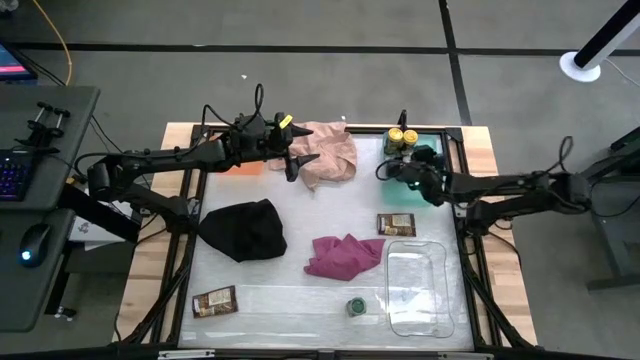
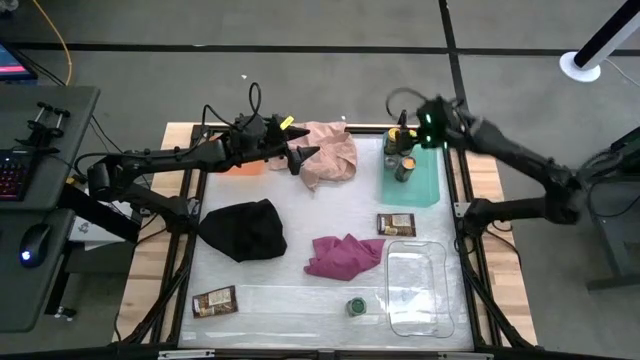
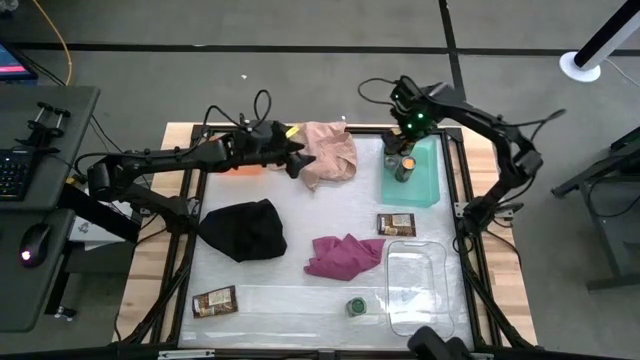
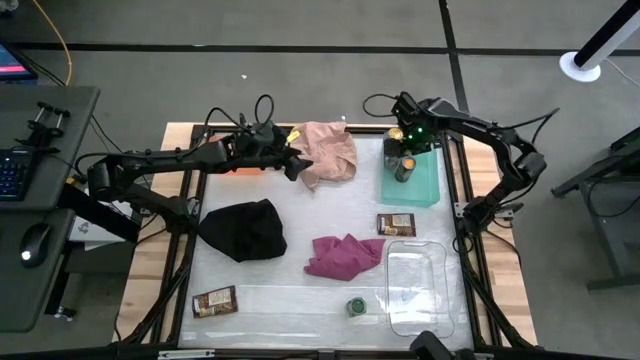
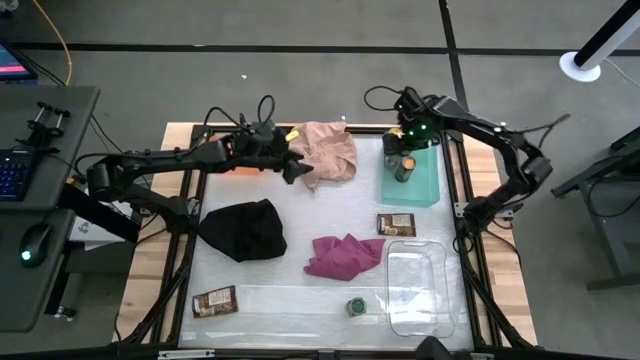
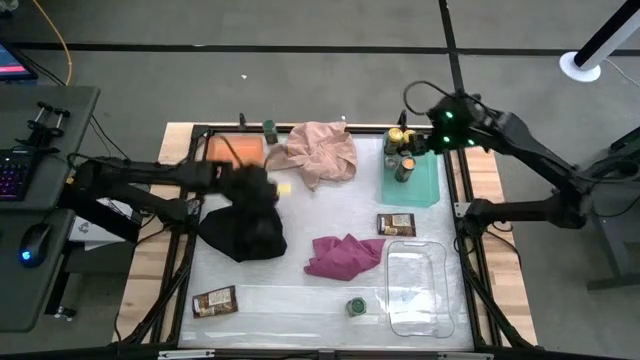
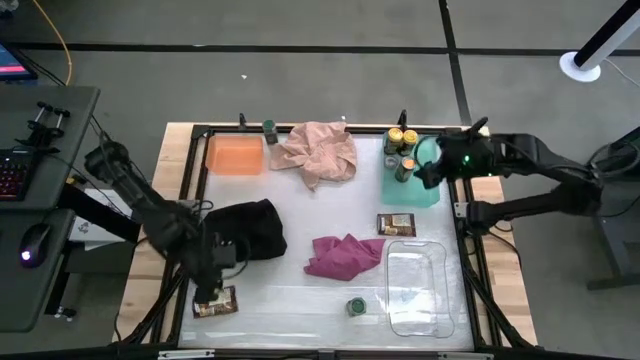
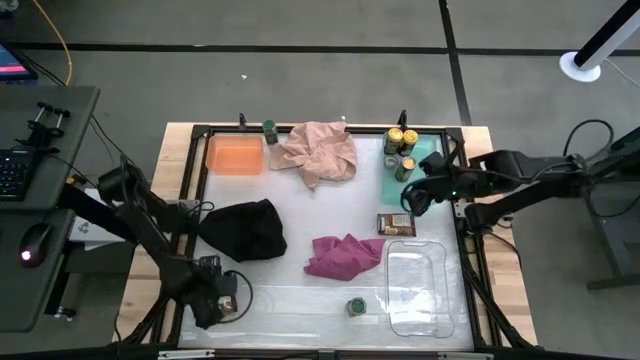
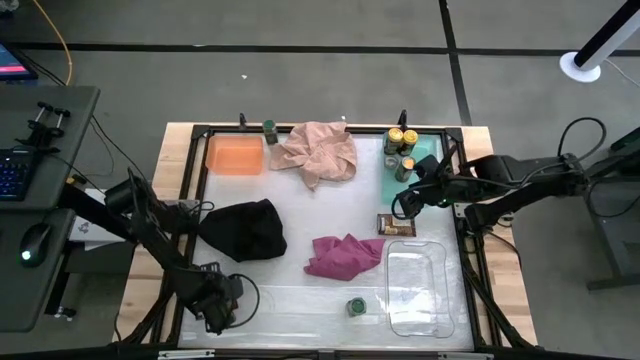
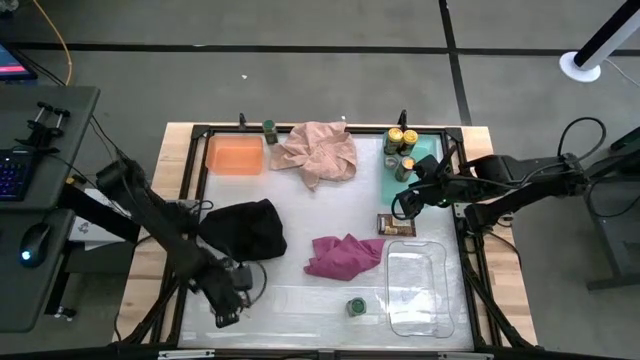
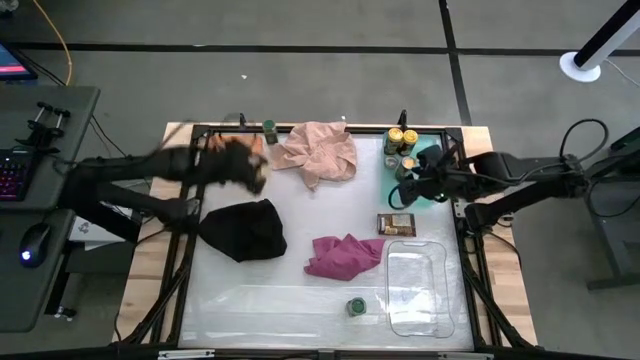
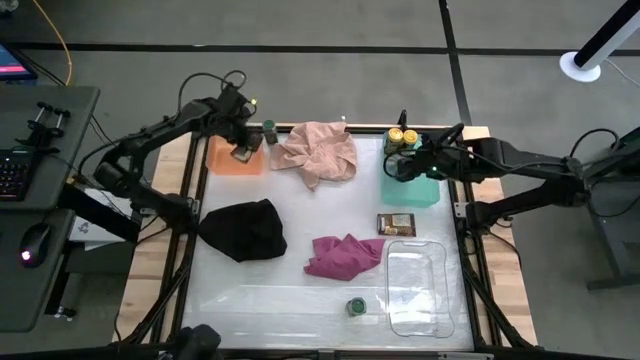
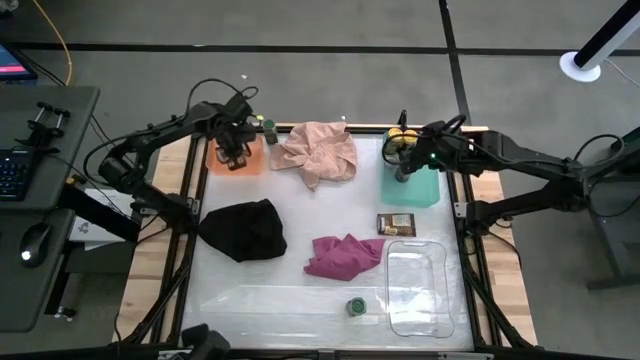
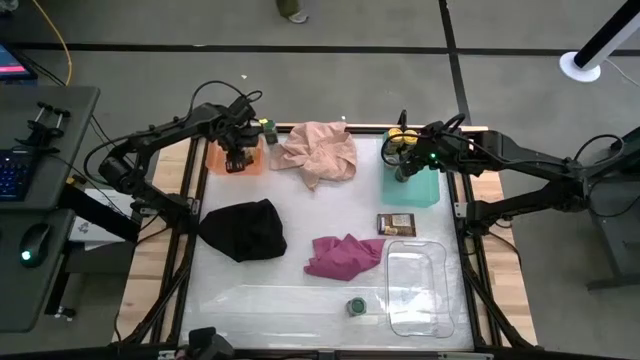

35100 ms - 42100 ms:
Task: Sort spices by type
Put the bottom orange seasoning pack into the orange bin

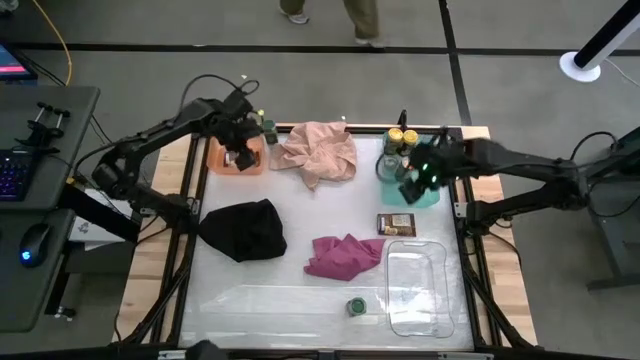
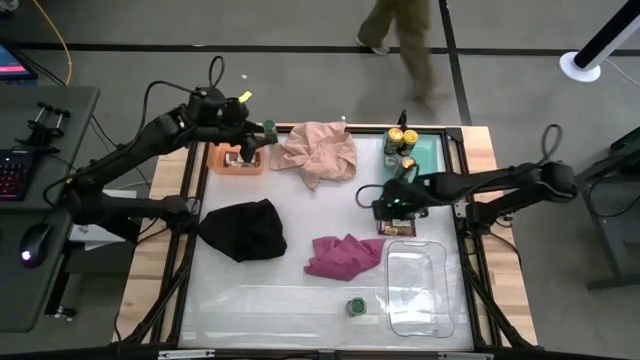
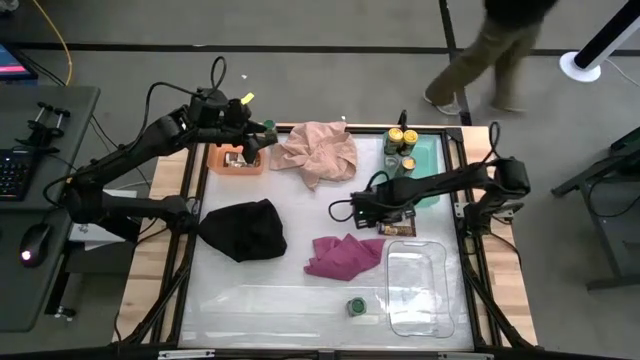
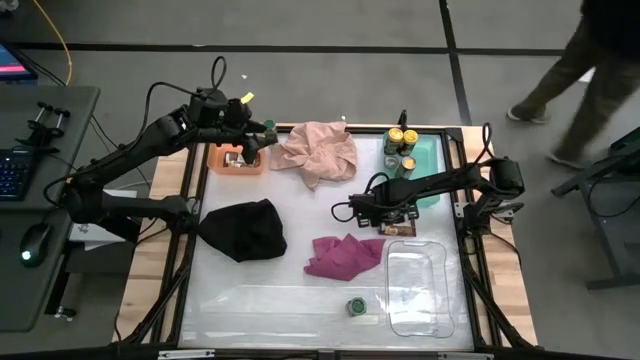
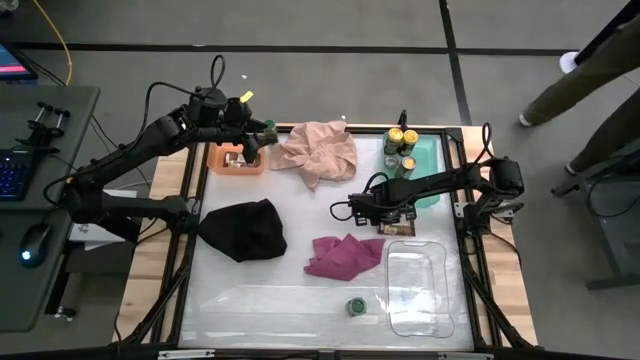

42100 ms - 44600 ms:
Put the brown seasoning pack into the orange bin

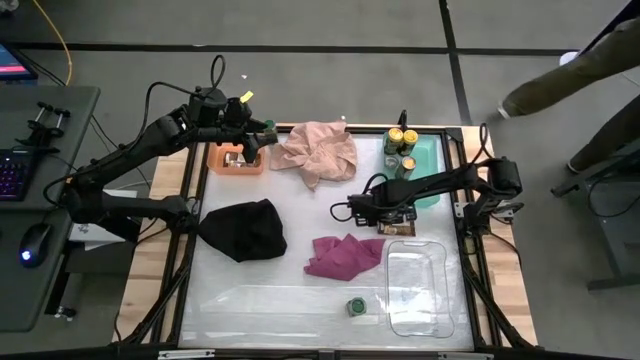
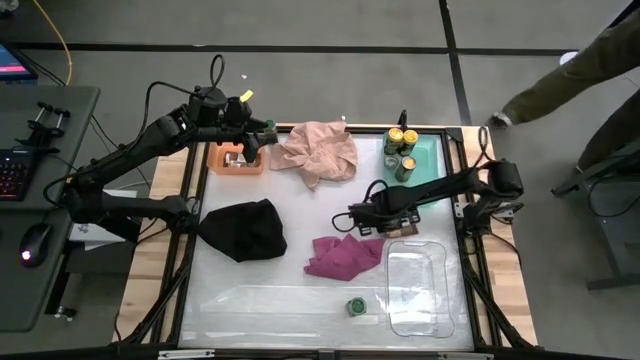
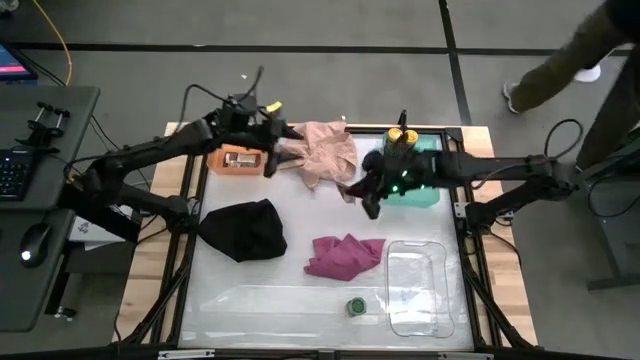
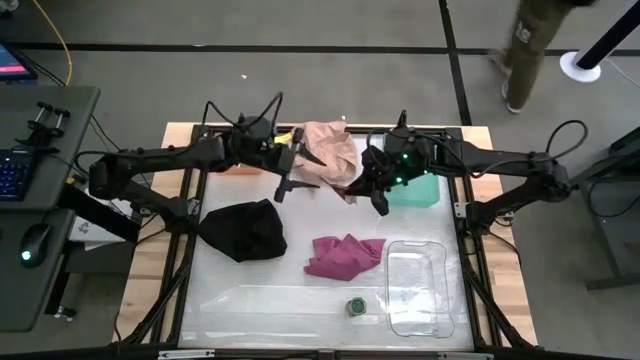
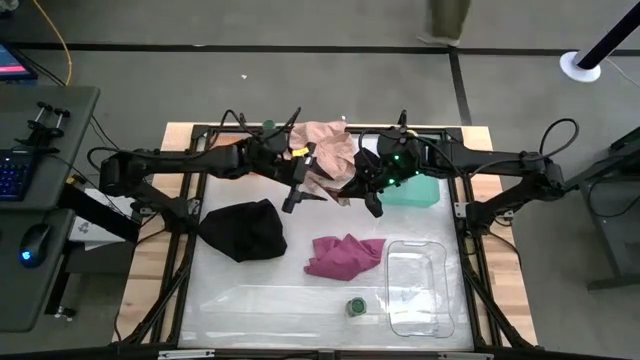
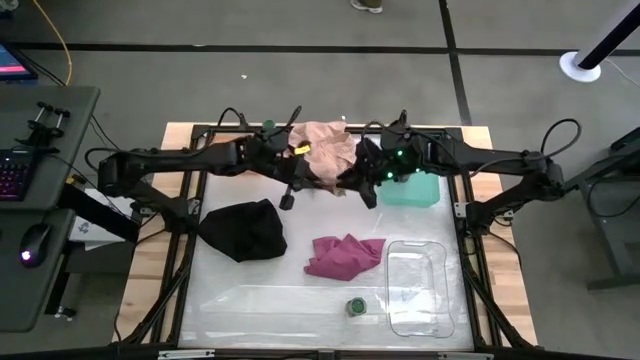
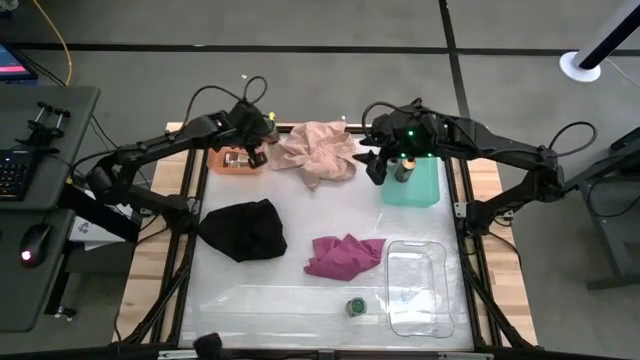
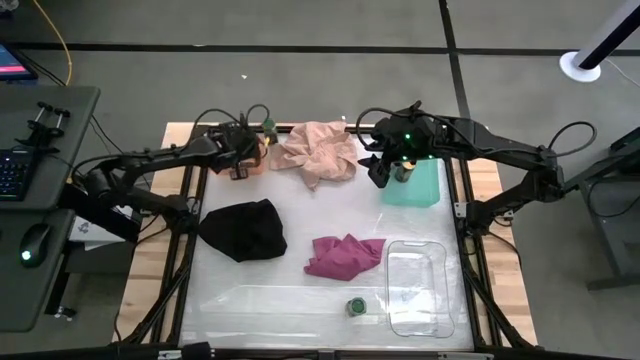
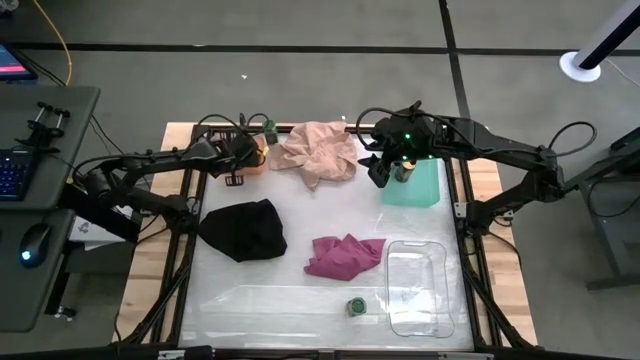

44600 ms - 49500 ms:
Put the orange seasoning pack into the orange bin

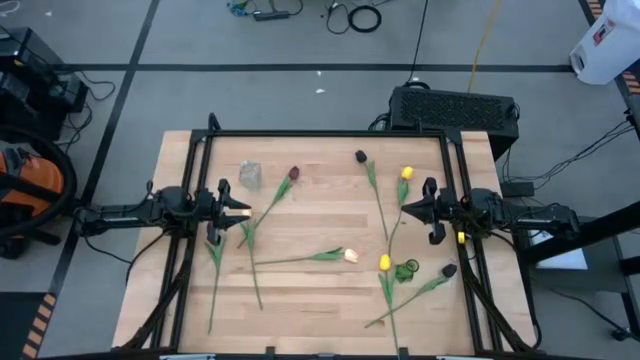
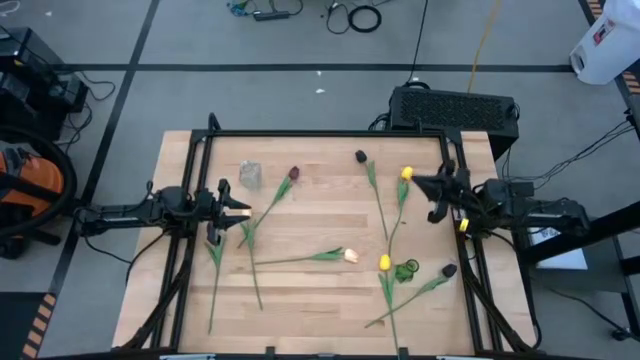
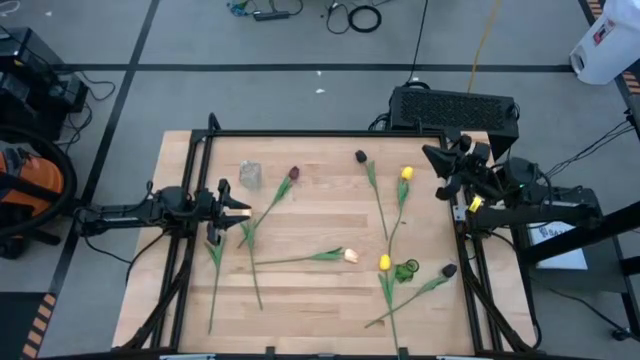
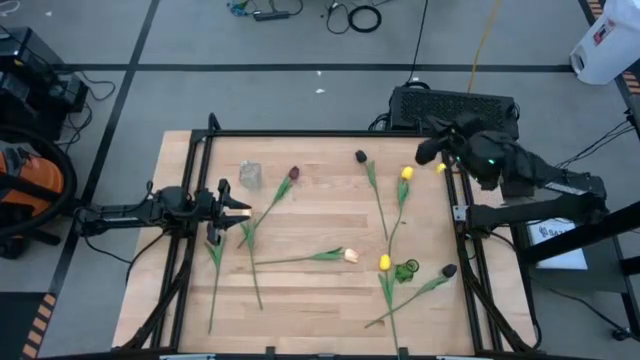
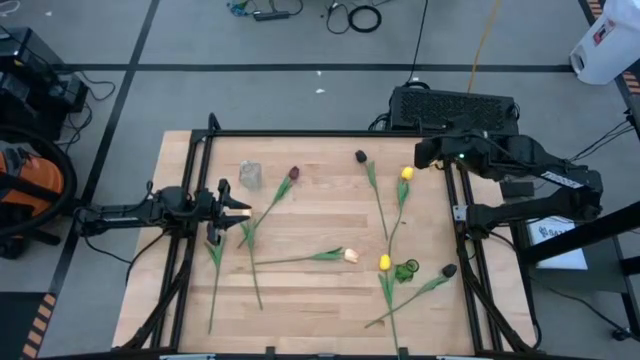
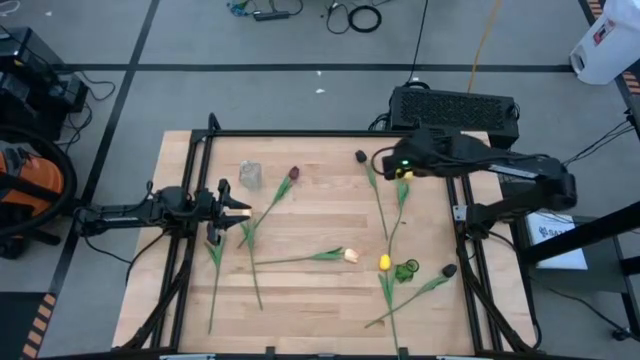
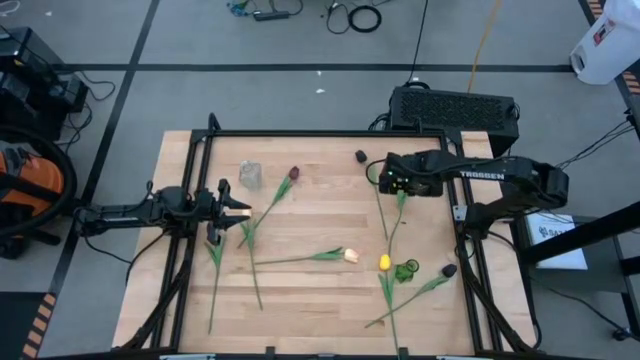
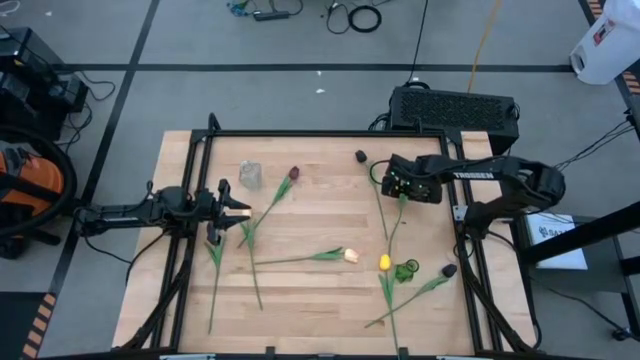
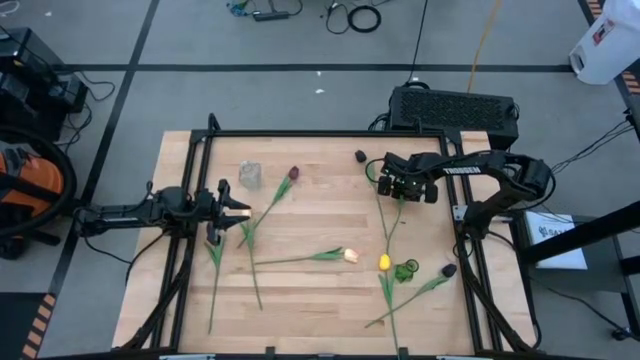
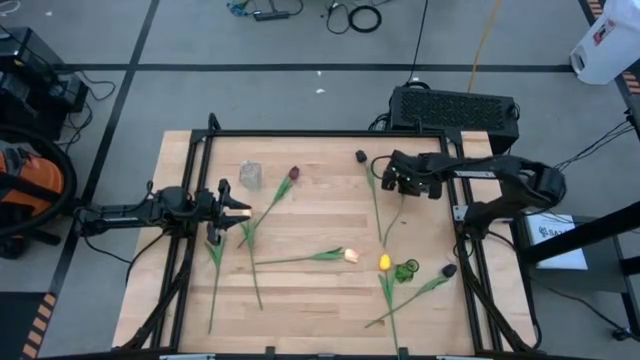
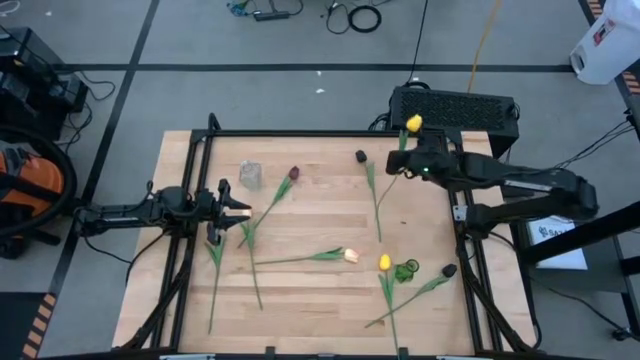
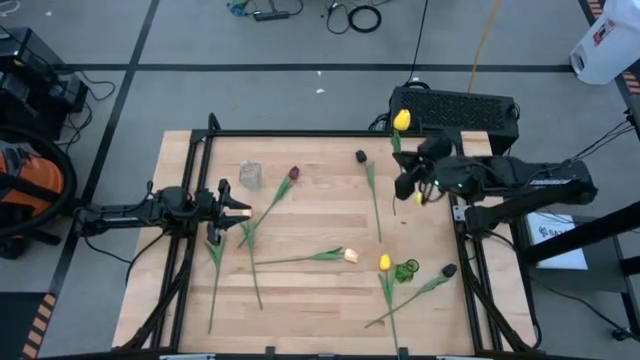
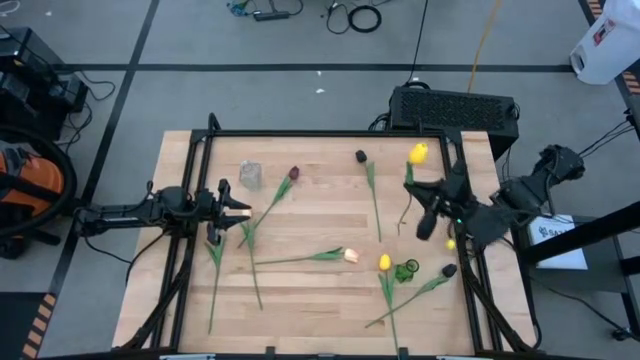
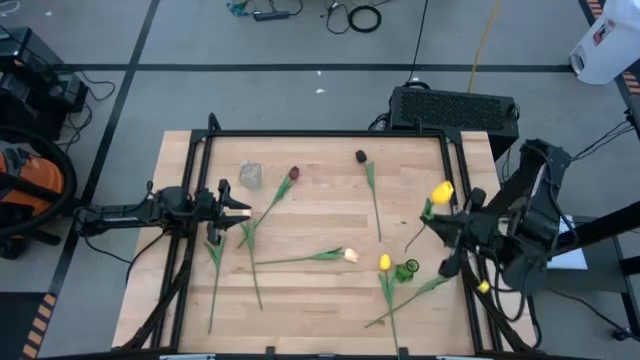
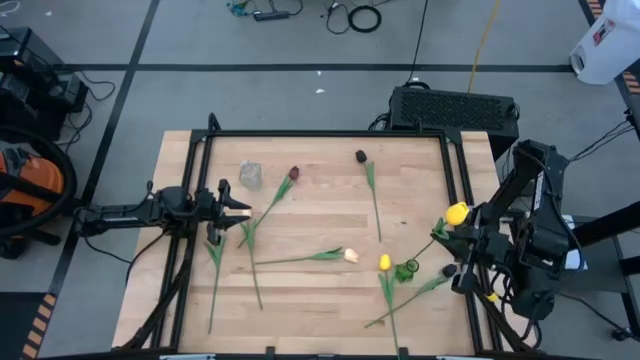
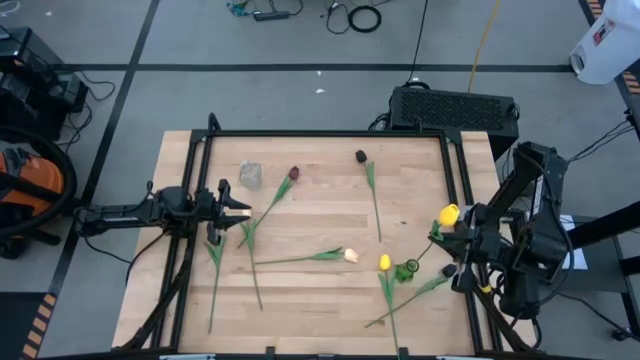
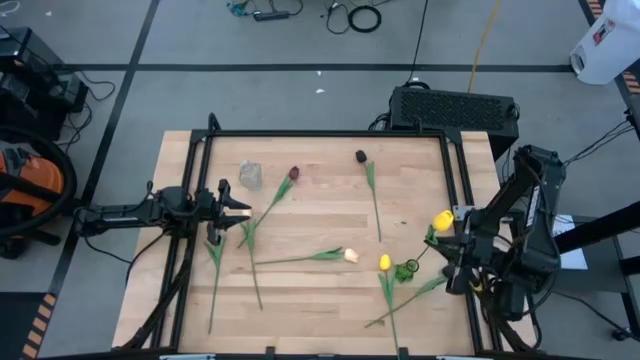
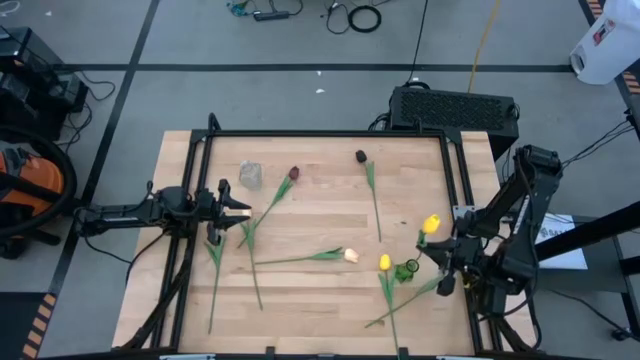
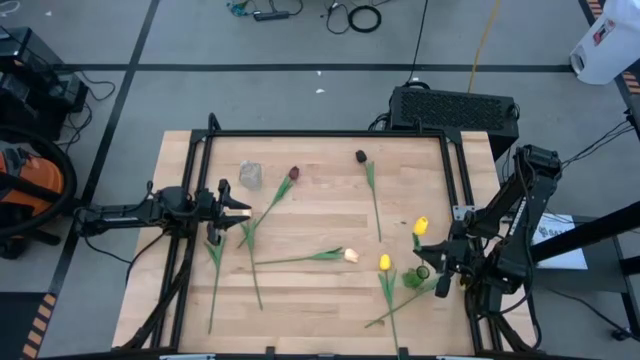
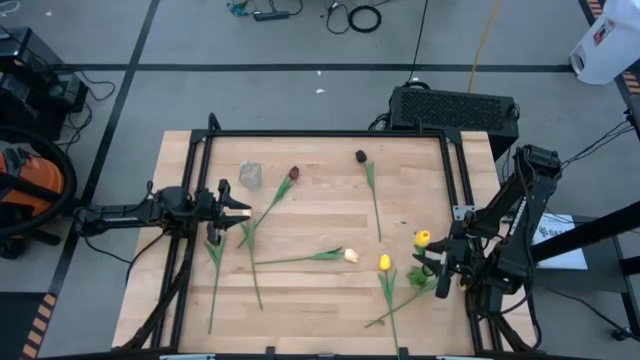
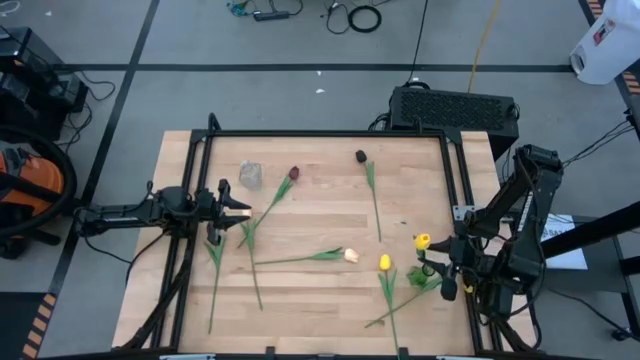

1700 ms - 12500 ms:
Task: Sort flowers into vase by color
Put the top yellow flower into the transparent green vase
